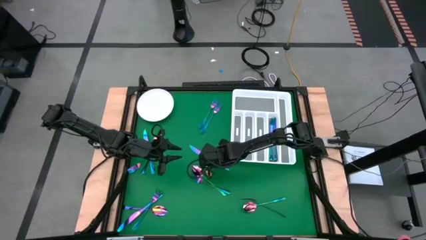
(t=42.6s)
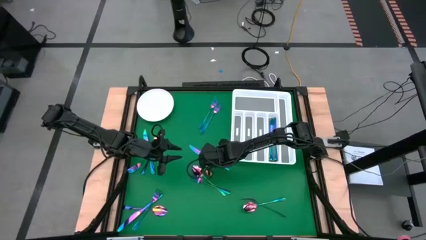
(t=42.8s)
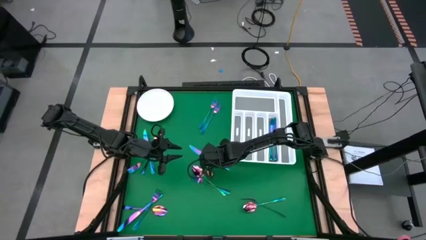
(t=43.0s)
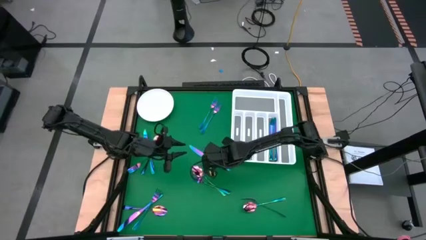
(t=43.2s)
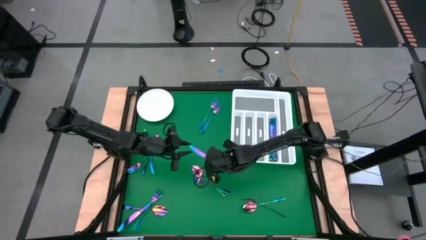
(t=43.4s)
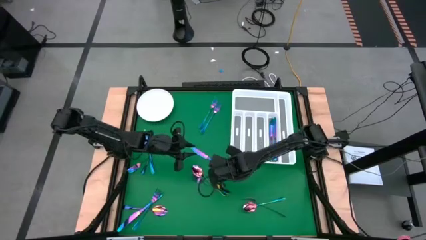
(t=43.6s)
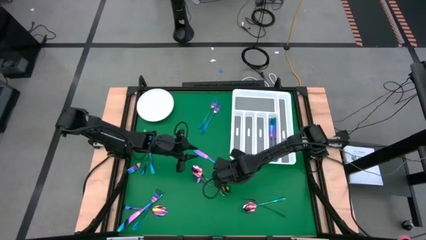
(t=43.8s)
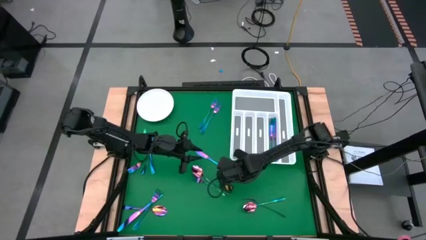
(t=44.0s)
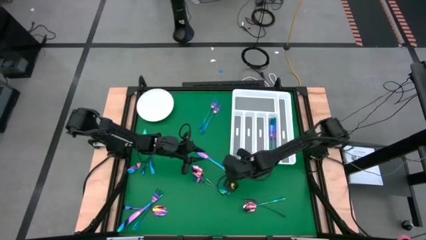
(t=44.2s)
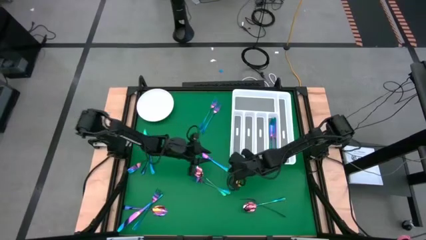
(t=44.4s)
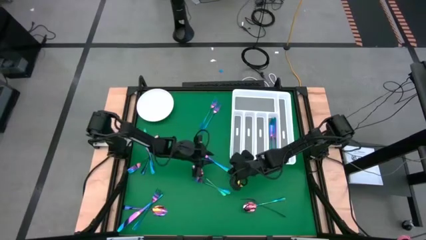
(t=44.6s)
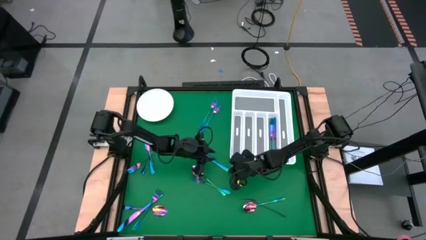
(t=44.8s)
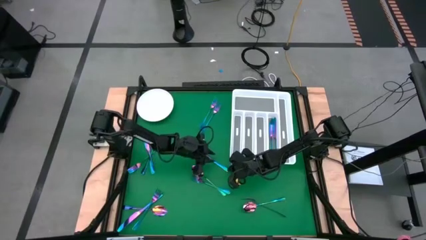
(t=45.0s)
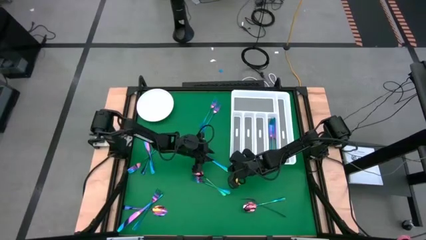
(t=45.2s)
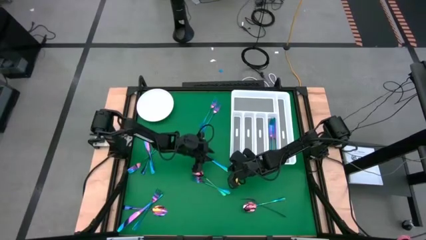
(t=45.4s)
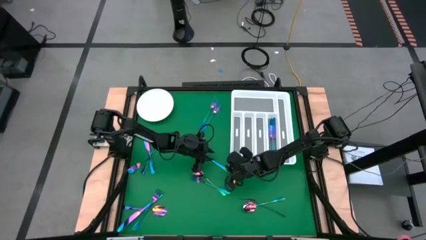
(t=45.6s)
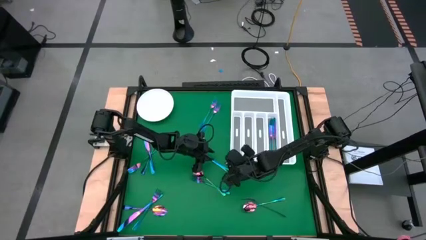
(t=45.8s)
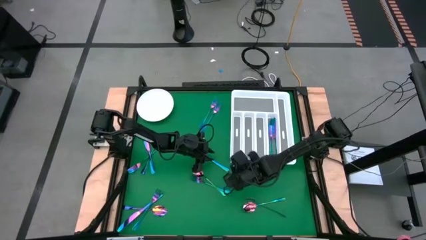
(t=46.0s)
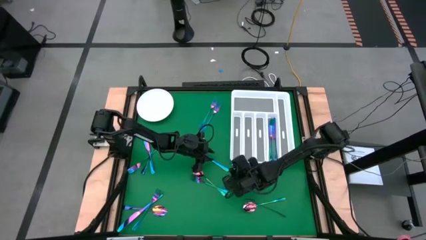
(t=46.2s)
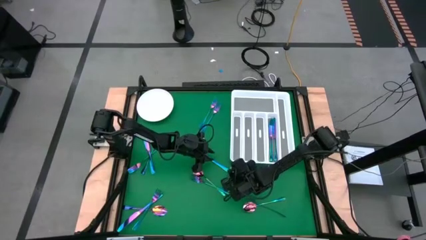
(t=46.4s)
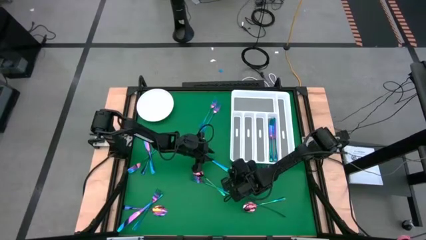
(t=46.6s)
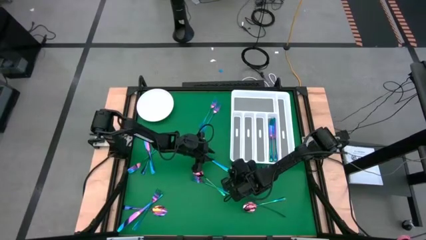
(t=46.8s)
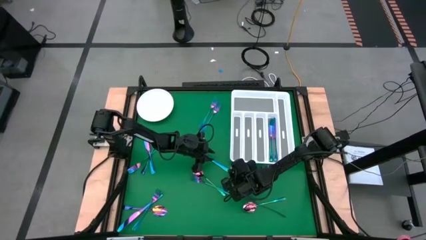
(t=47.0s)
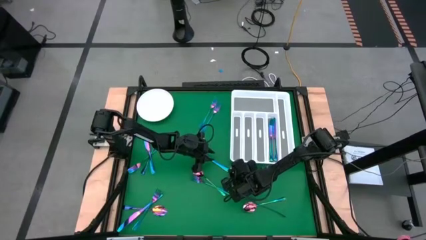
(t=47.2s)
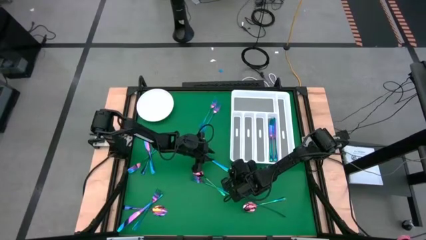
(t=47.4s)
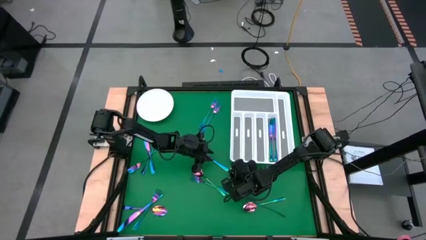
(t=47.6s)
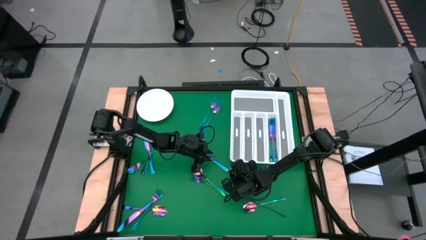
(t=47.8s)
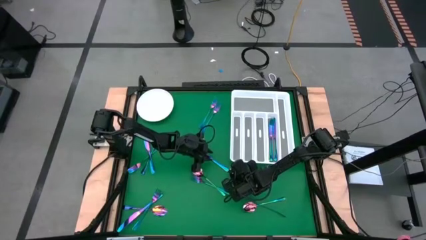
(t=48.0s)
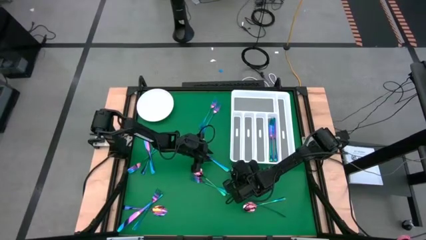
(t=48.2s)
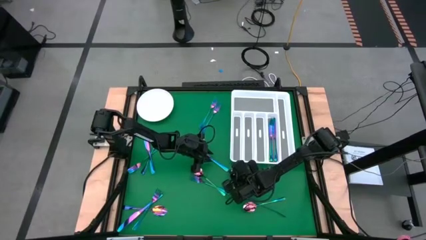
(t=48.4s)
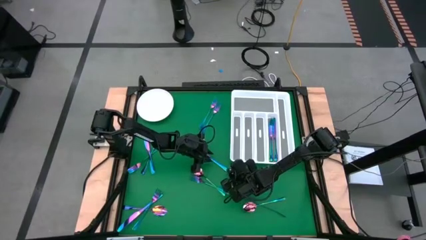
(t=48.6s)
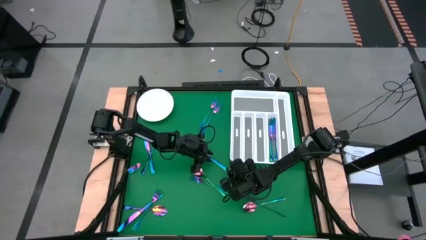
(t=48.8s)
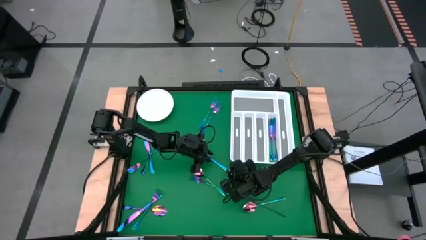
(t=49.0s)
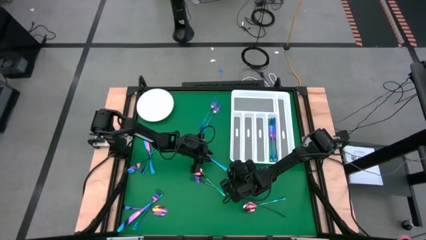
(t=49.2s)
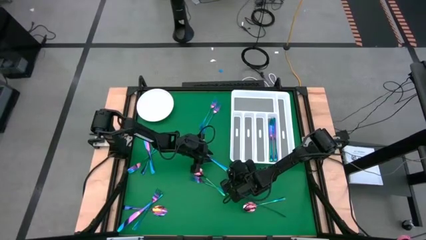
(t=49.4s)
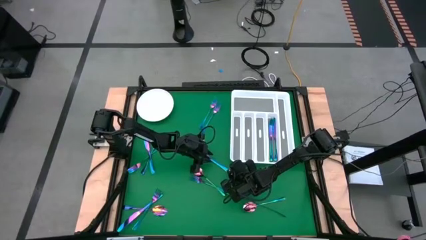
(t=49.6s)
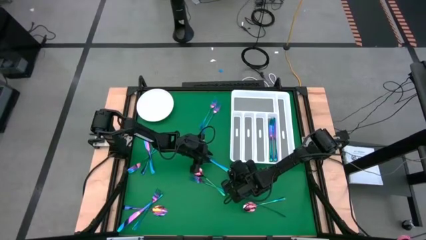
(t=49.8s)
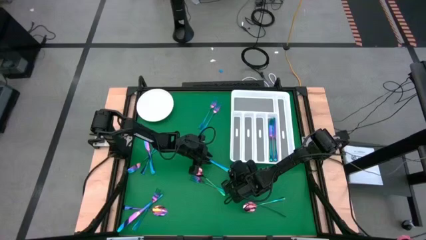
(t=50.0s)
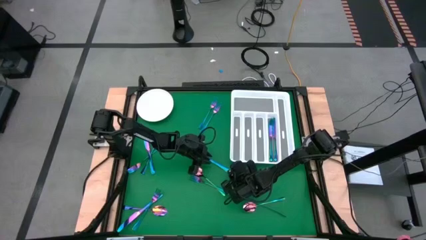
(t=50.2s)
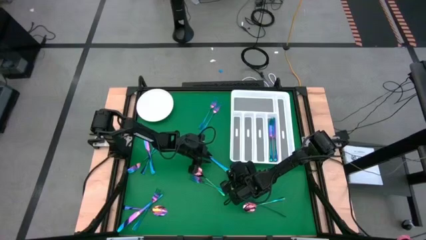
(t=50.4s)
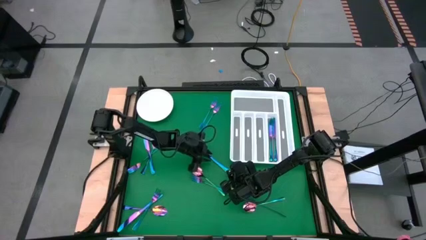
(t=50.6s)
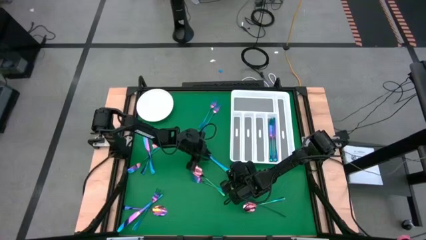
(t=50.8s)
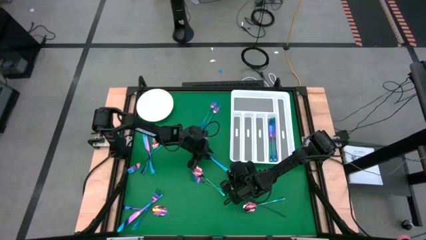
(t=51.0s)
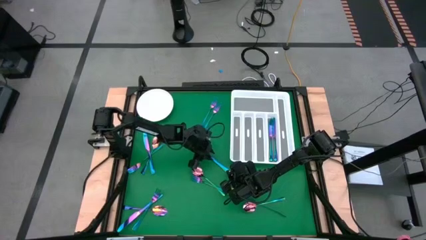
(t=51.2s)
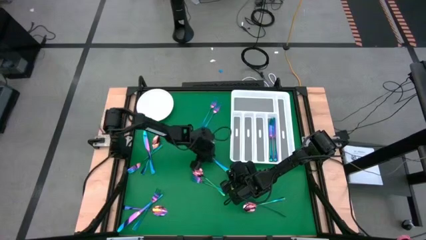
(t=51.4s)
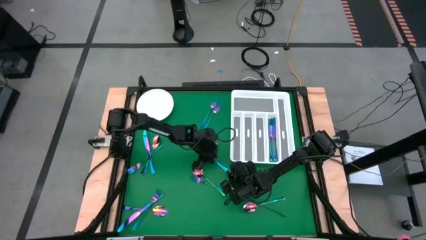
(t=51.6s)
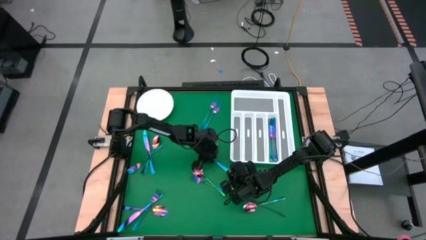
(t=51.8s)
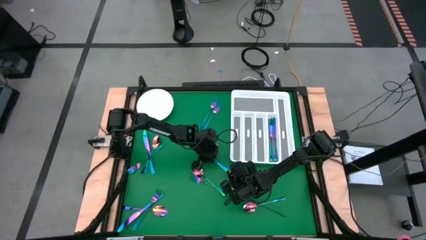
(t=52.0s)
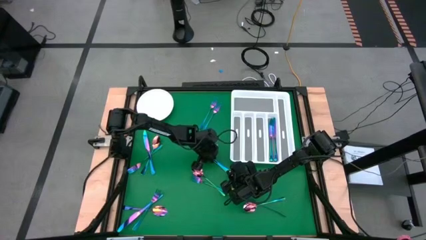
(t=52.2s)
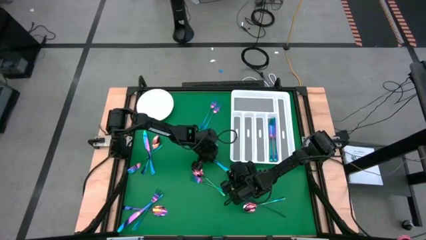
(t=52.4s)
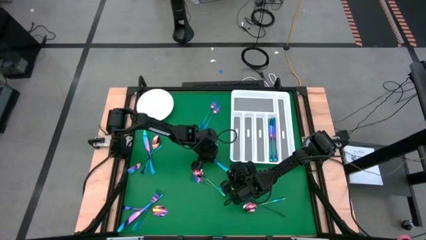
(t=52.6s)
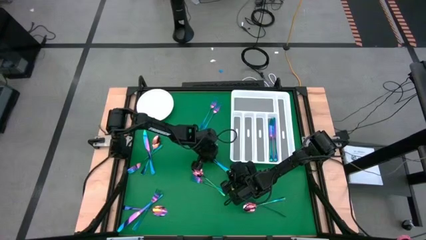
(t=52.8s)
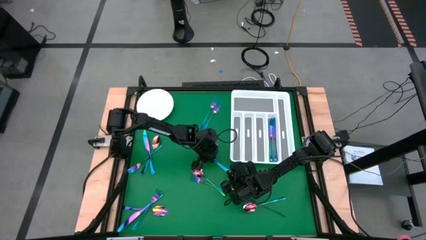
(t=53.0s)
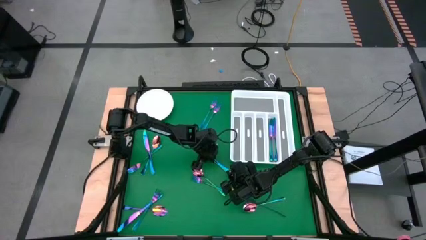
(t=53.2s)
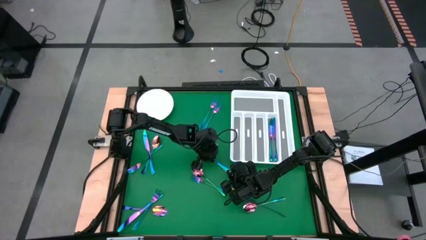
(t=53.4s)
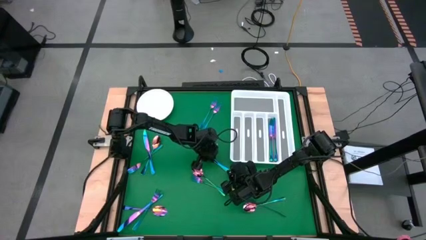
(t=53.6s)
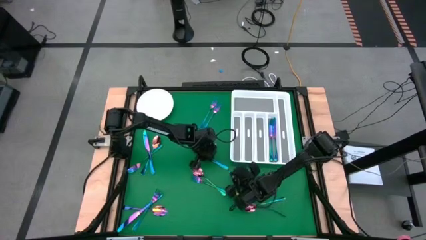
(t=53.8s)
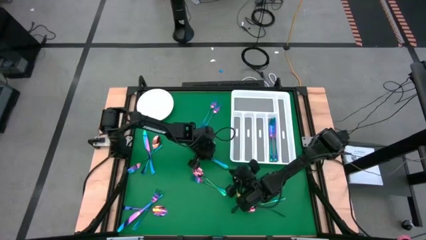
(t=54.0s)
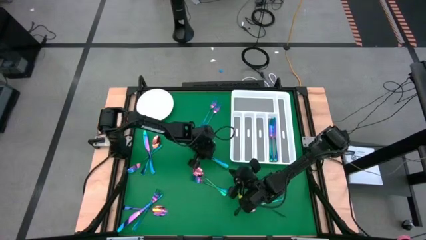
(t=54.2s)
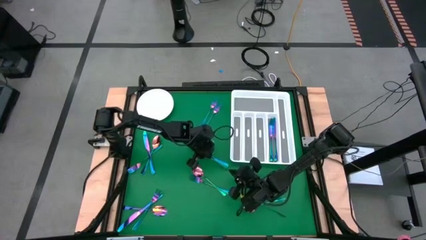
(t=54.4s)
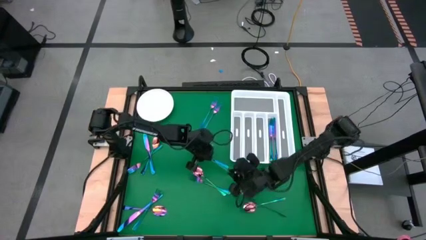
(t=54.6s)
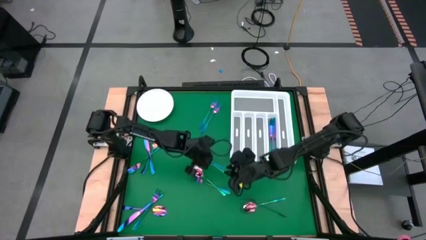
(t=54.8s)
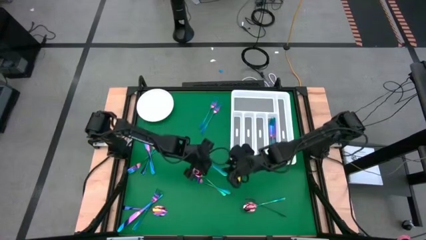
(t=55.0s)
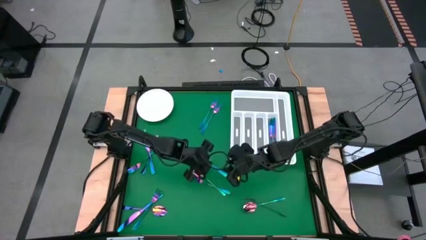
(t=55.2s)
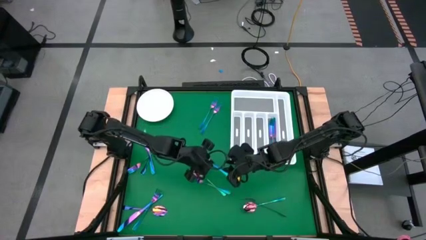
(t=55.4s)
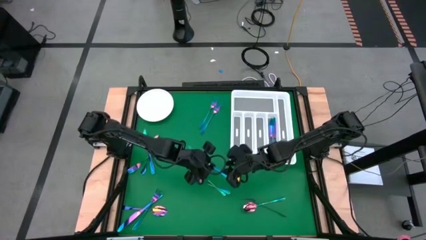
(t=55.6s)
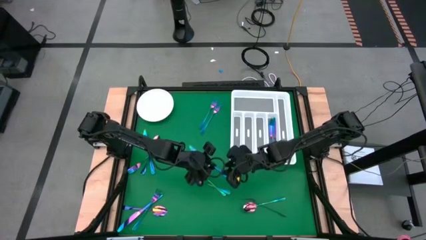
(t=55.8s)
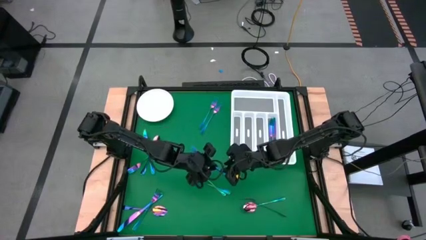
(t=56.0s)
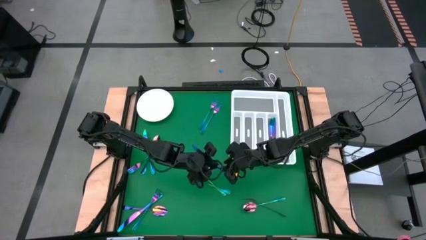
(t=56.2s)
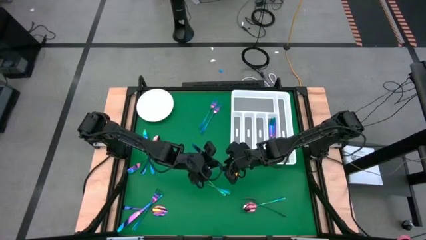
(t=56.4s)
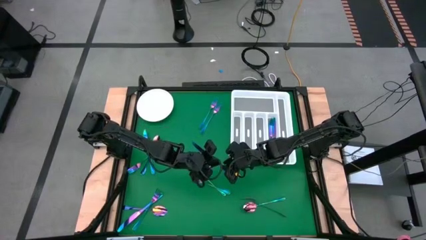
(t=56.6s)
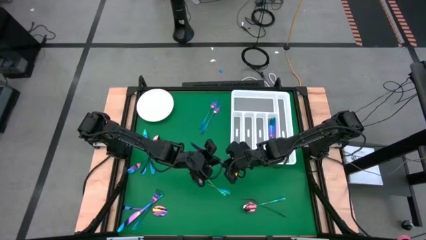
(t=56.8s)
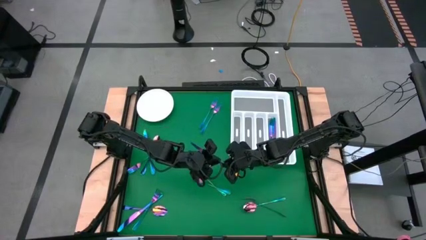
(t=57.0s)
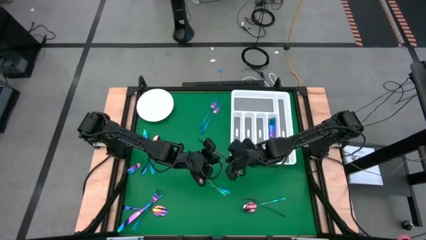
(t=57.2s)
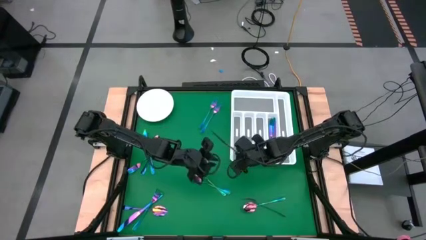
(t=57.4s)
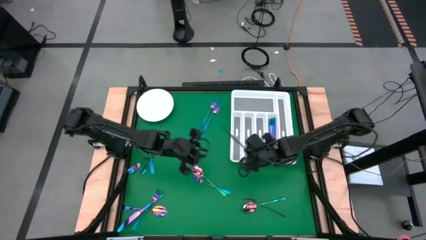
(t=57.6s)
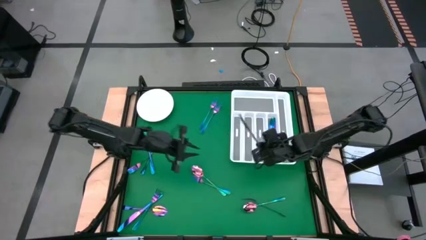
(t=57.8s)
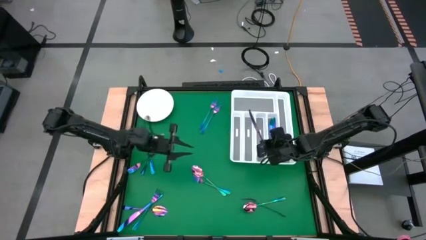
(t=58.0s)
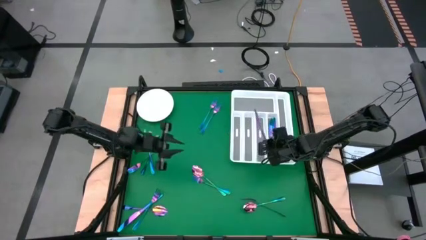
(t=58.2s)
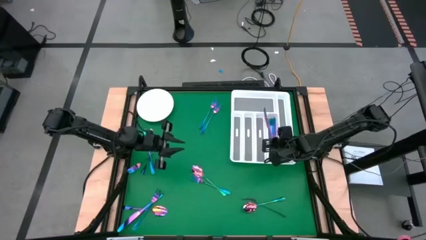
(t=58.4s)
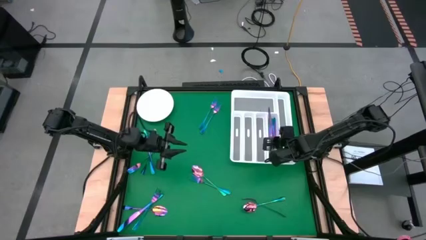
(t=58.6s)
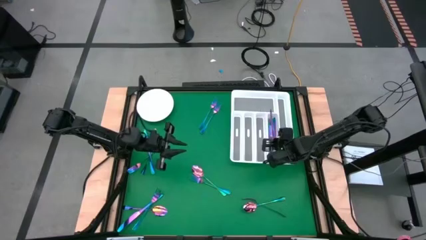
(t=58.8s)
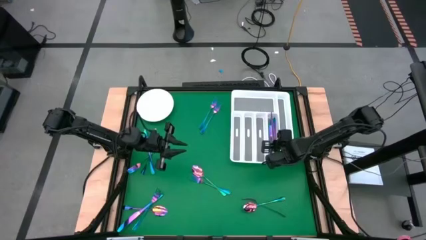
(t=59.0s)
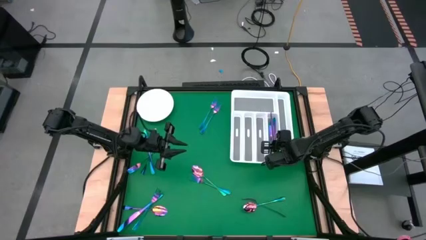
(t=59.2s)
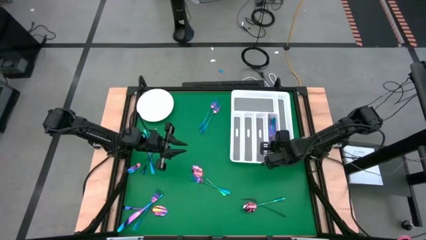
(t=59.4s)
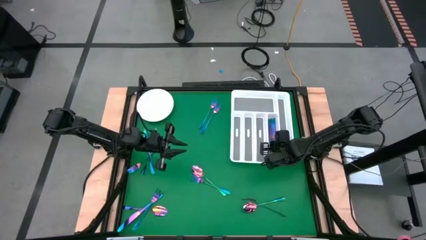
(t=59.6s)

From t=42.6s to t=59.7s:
Task: Sort silverware
Put the blue knife into the white cutlery tray
